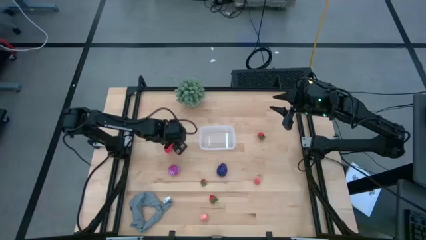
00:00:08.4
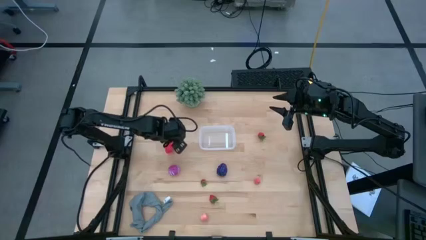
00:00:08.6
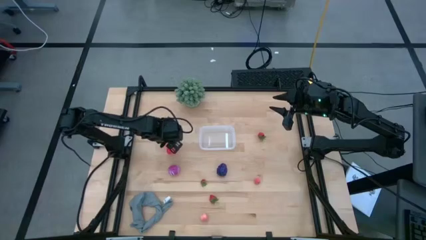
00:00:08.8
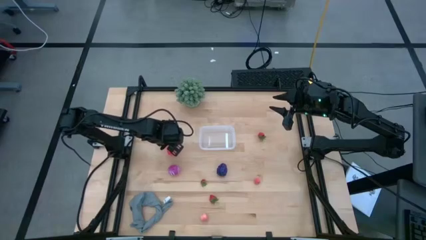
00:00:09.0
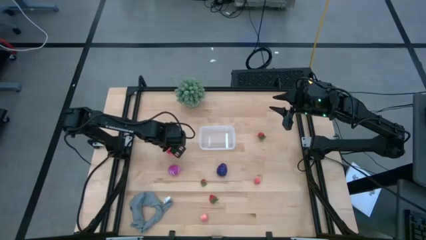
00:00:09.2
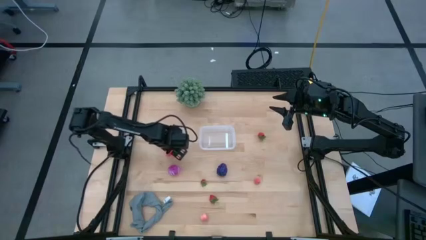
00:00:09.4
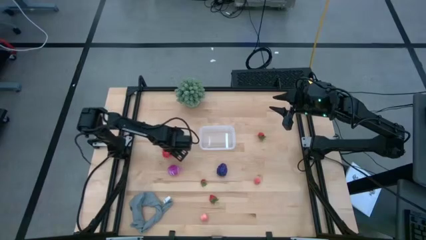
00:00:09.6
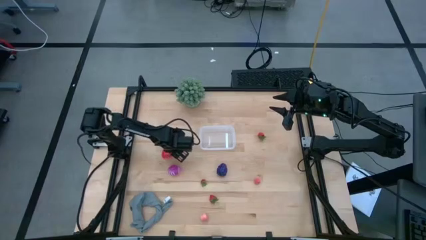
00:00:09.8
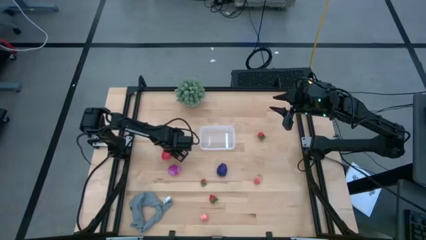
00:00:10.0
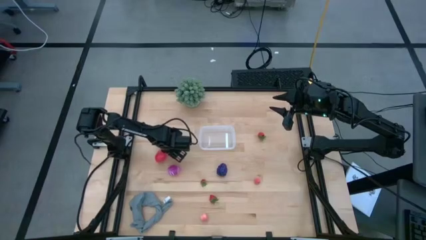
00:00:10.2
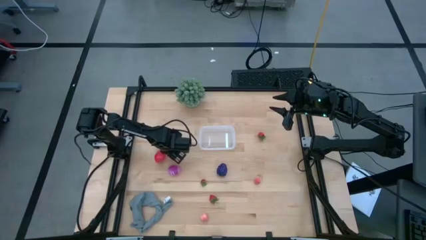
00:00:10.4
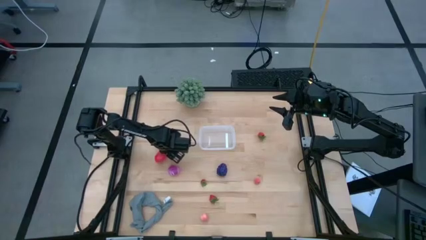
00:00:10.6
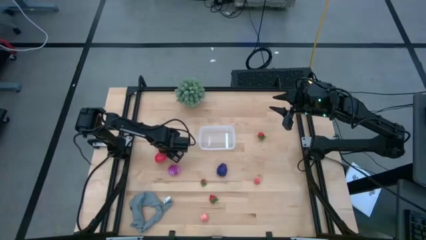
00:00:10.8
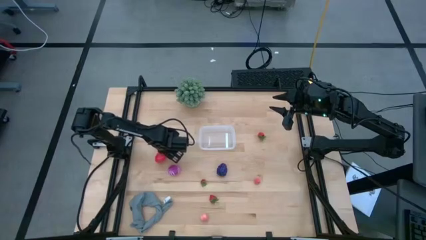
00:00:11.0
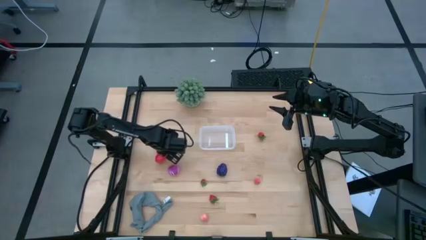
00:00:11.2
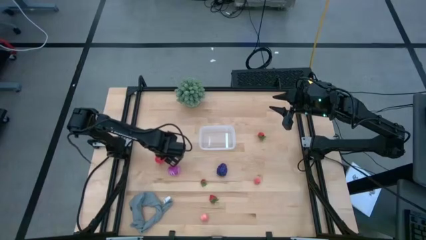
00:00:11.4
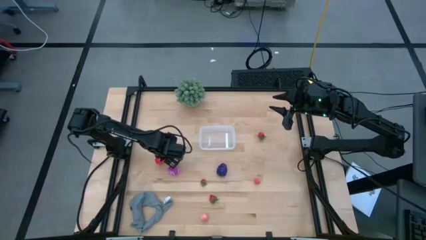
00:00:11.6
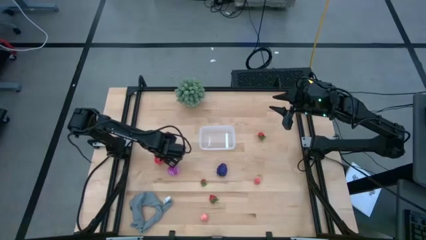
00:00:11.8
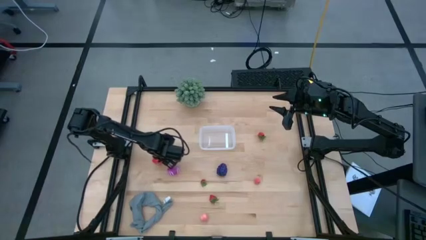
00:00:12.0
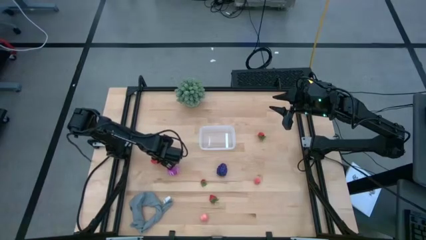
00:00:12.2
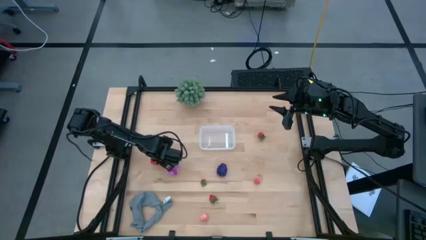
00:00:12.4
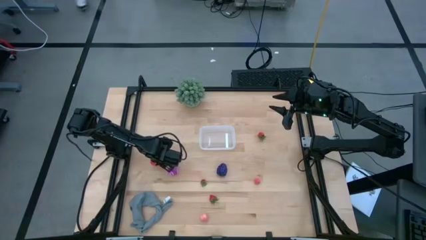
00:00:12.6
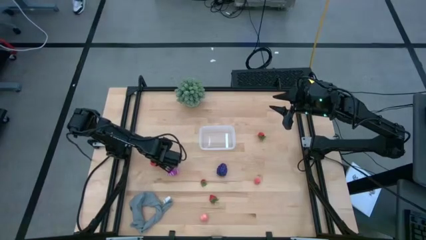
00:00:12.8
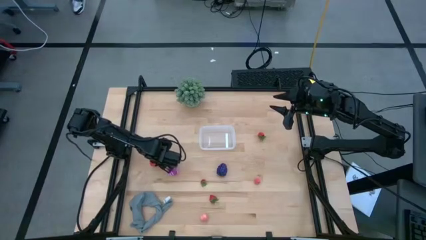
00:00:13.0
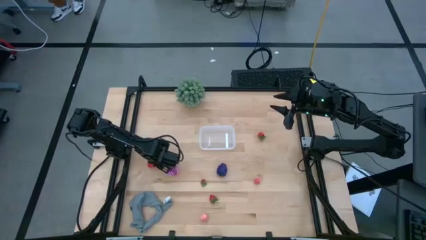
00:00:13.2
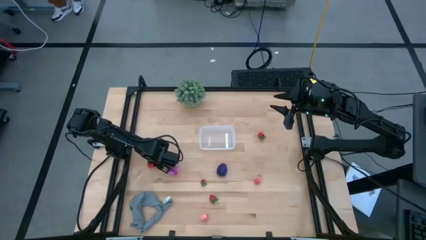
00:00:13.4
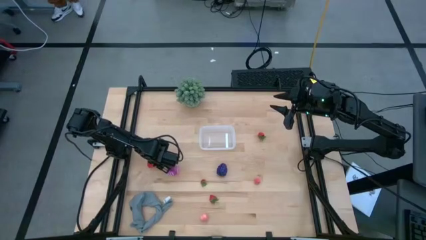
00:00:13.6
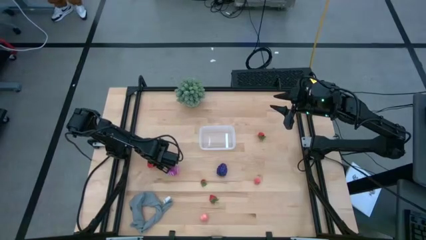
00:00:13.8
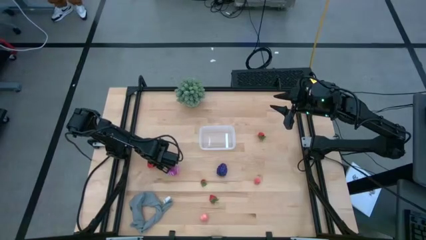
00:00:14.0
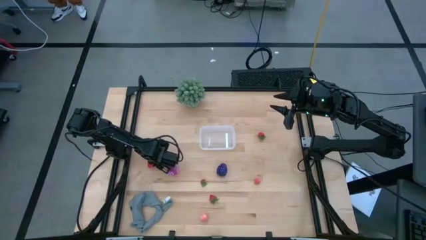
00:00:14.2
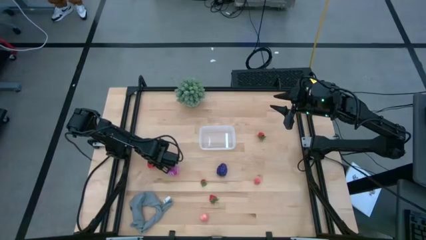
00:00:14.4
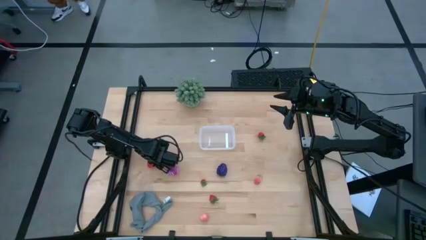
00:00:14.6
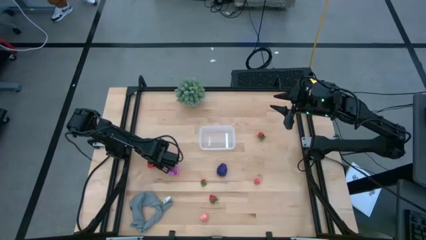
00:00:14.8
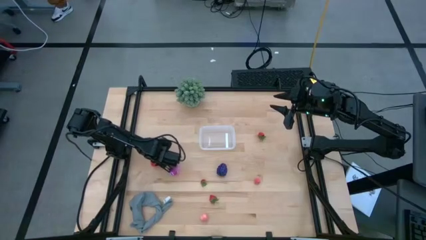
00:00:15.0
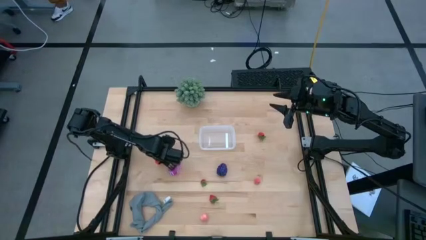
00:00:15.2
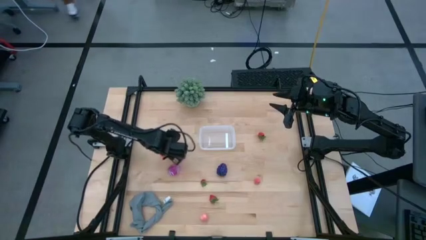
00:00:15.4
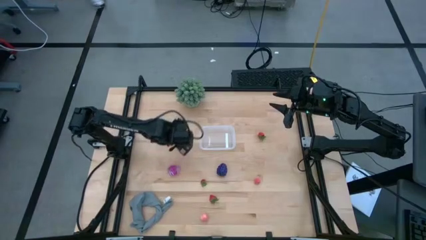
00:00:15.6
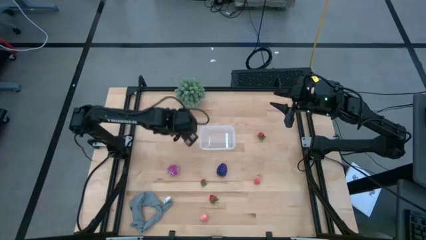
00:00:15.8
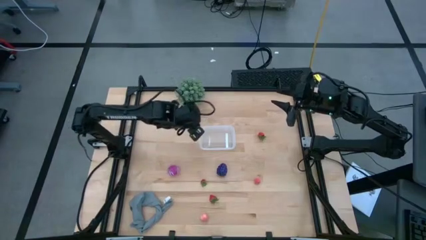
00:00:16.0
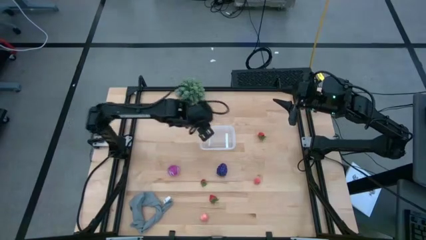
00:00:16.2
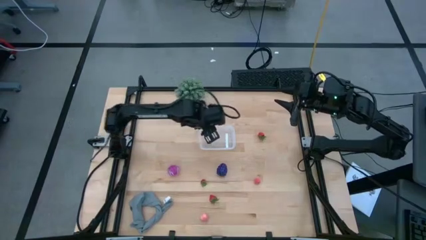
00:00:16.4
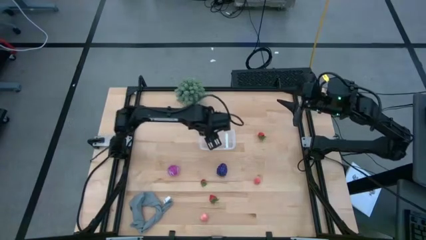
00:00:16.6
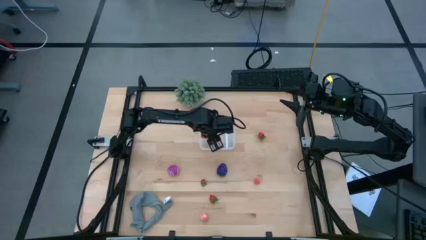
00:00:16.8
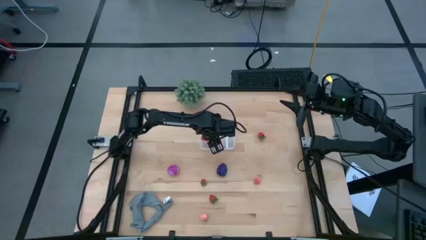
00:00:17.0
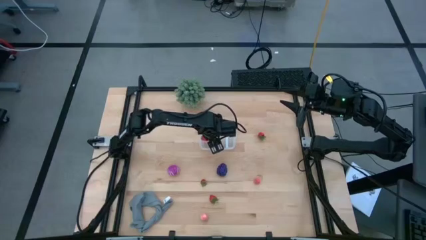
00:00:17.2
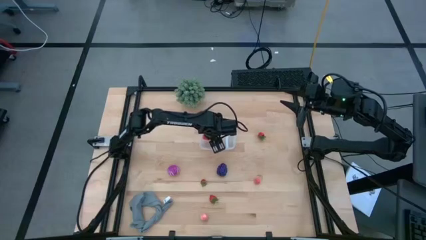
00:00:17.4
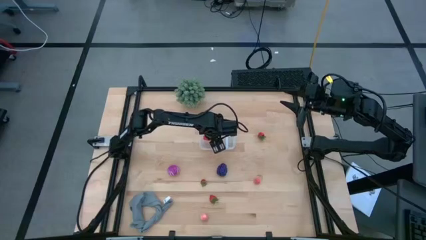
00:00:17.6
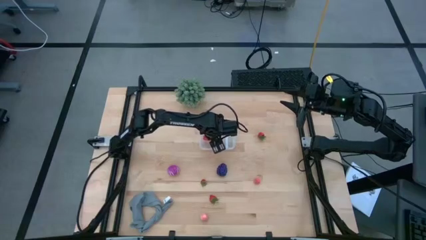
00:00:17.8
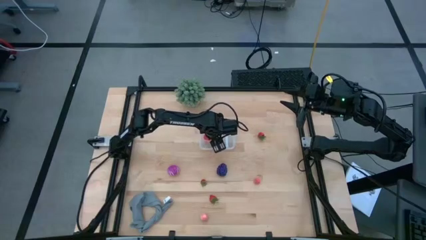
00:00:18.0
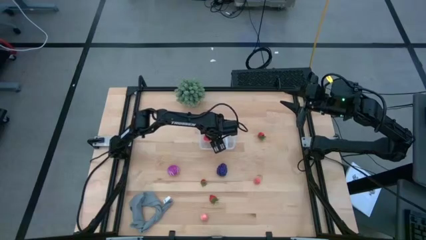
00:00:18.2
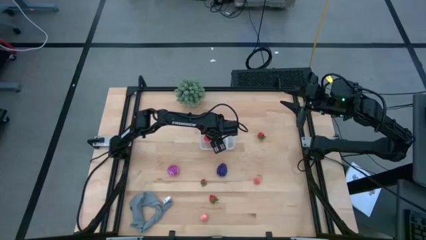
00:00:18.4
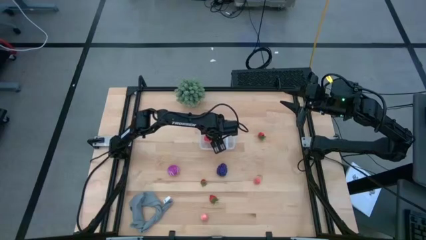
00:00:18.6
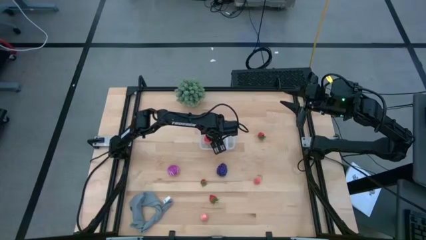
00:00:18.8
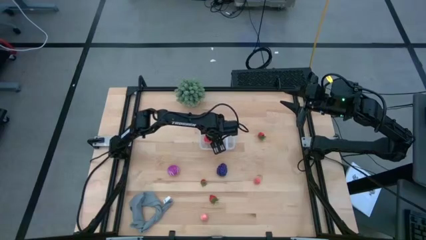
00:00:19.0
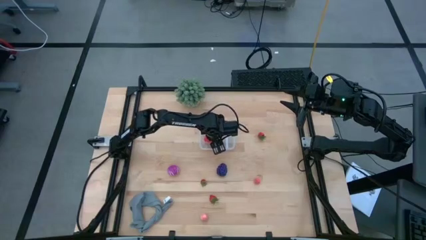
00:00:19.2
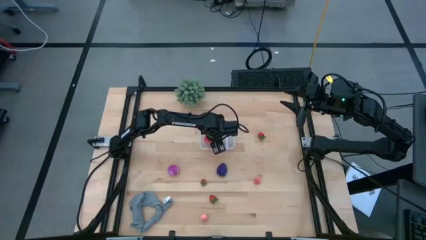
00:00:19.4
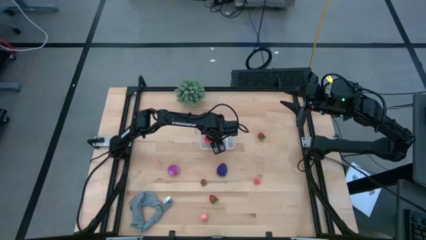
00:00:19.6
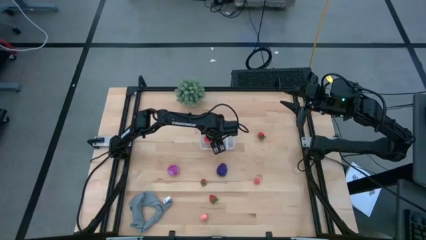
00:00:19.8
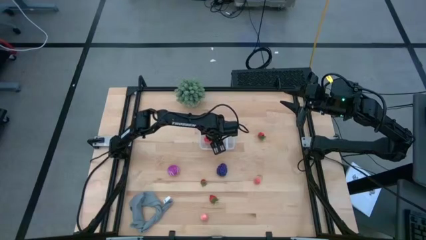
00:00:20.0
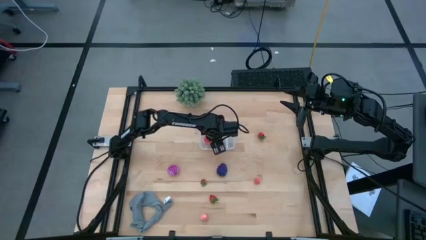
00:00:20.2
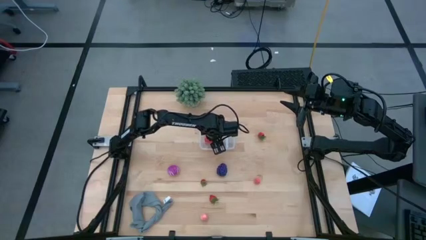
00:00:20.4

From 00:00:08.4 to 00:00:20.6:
Task: Pick and placing Produce into tupperware
Put the dragon fruit into the bin
